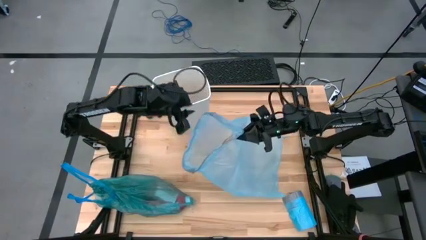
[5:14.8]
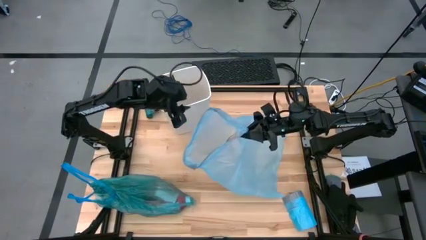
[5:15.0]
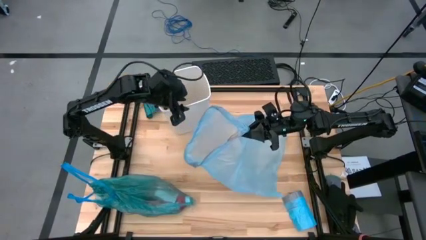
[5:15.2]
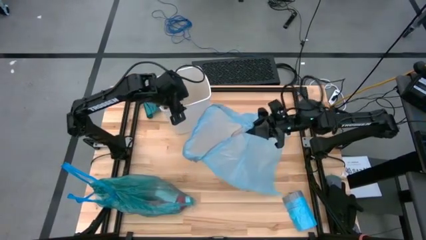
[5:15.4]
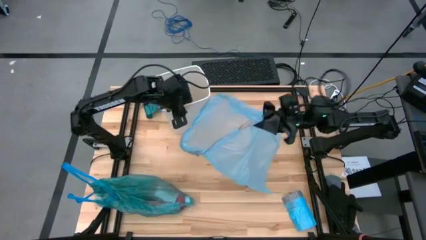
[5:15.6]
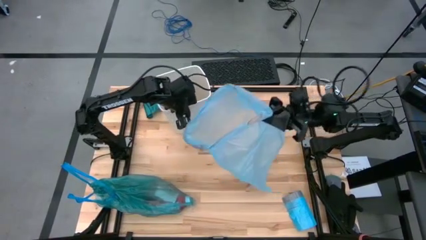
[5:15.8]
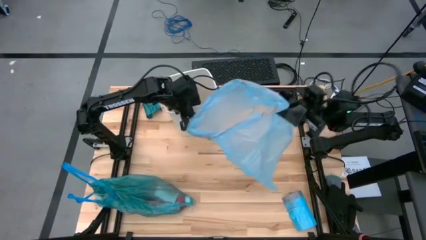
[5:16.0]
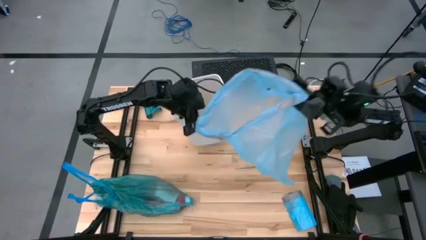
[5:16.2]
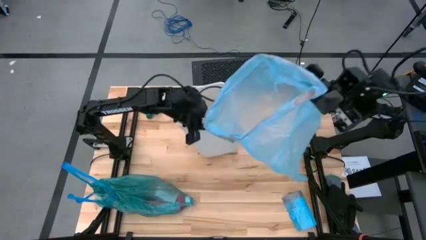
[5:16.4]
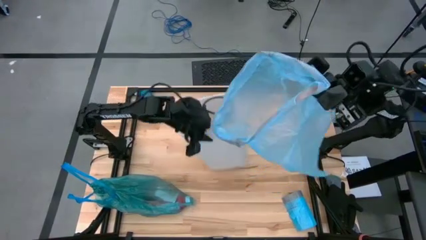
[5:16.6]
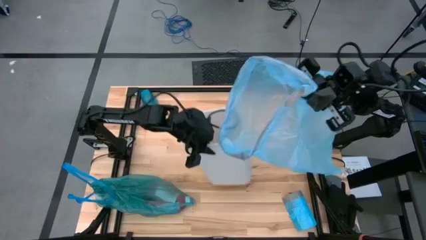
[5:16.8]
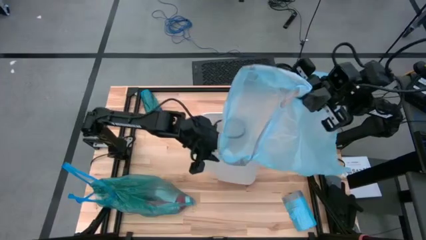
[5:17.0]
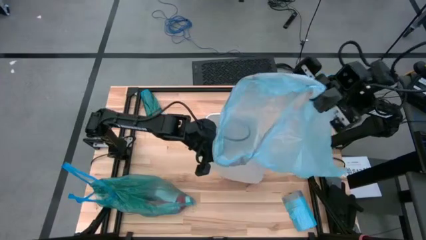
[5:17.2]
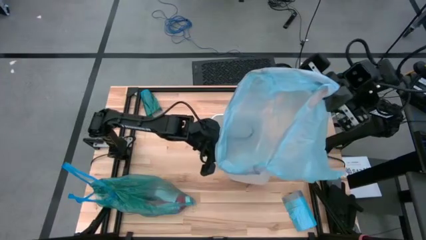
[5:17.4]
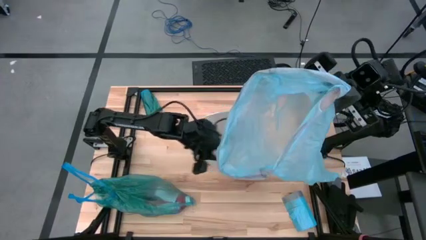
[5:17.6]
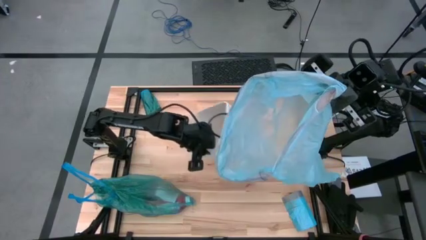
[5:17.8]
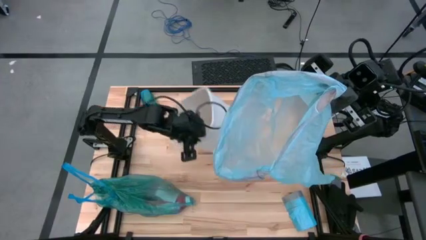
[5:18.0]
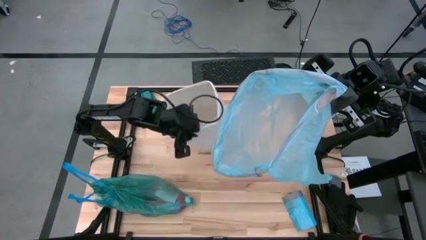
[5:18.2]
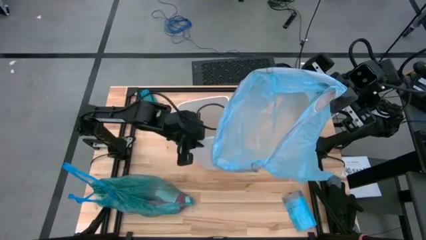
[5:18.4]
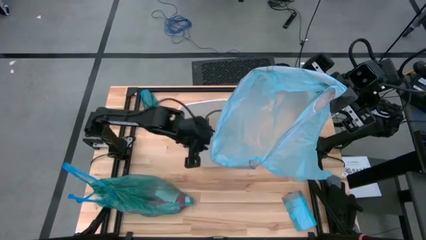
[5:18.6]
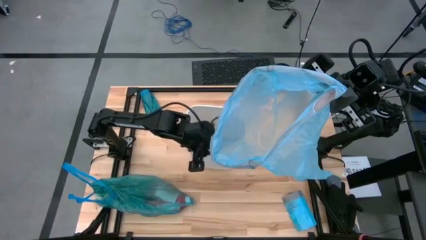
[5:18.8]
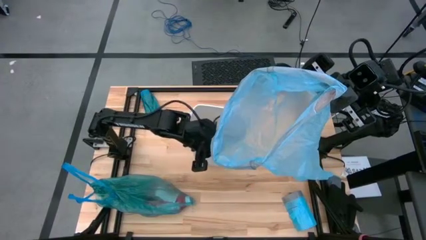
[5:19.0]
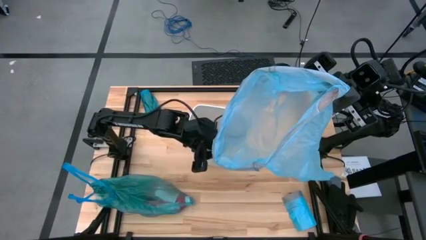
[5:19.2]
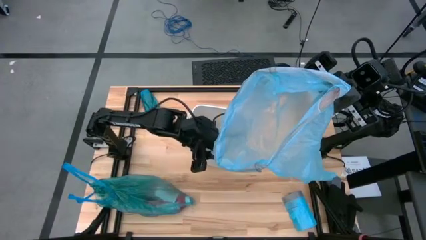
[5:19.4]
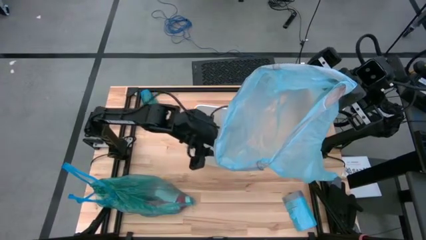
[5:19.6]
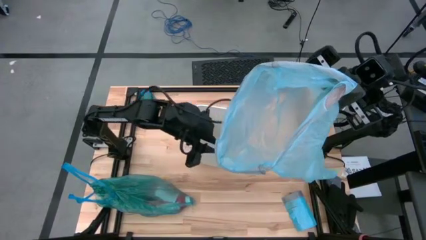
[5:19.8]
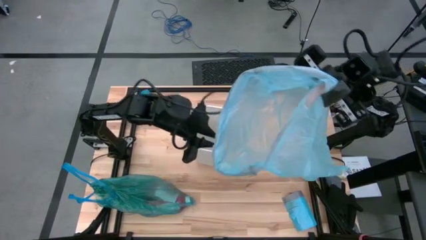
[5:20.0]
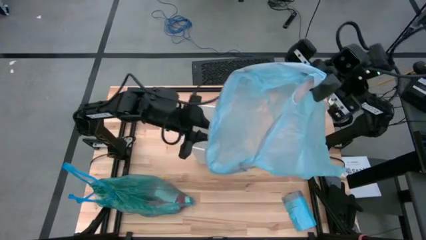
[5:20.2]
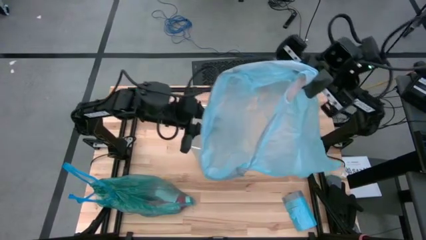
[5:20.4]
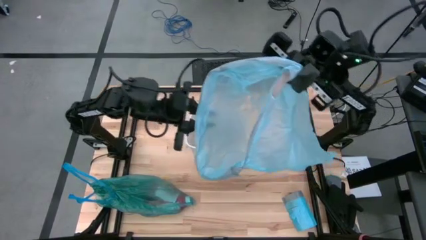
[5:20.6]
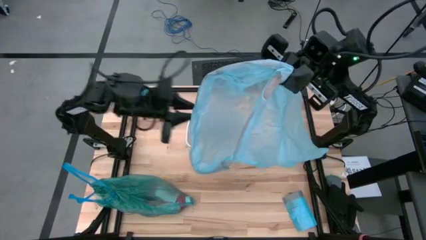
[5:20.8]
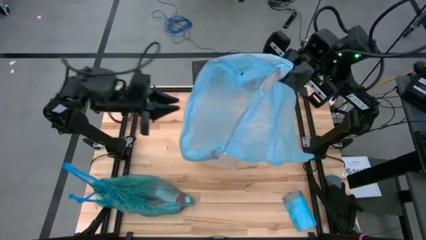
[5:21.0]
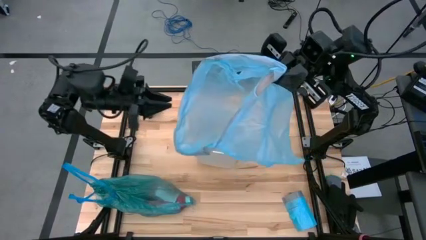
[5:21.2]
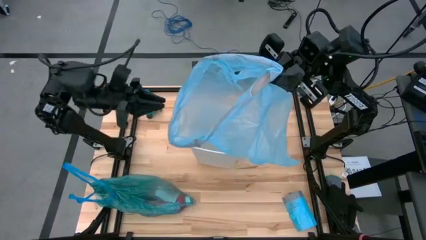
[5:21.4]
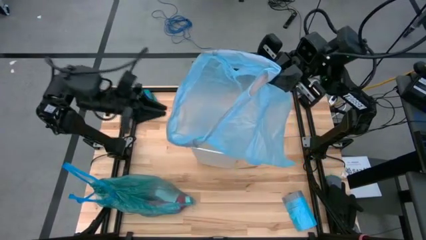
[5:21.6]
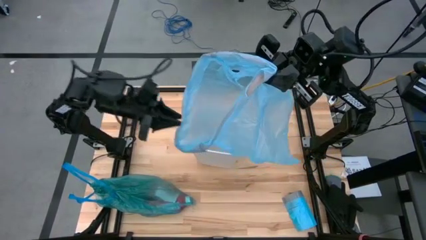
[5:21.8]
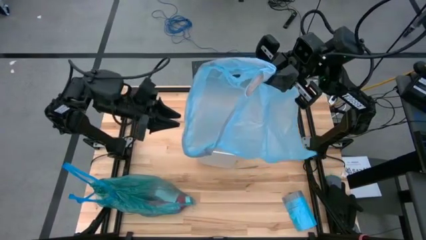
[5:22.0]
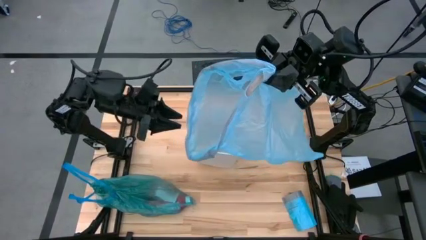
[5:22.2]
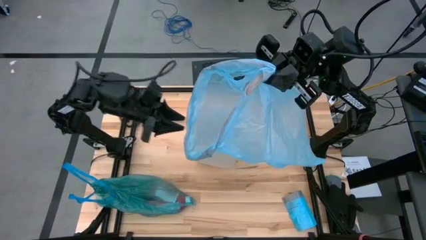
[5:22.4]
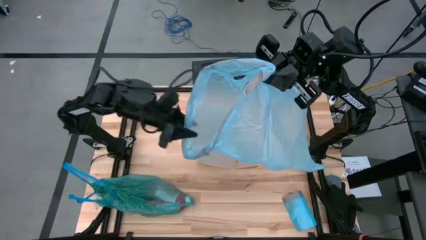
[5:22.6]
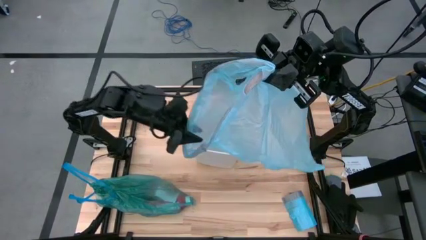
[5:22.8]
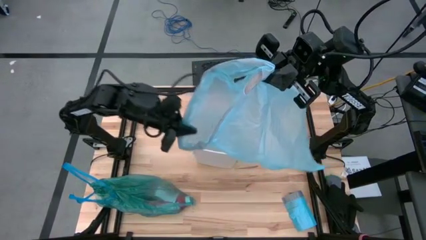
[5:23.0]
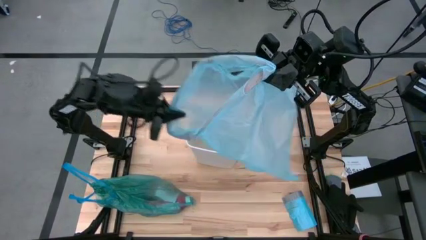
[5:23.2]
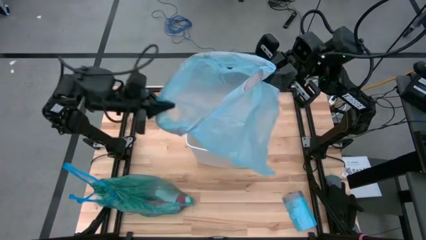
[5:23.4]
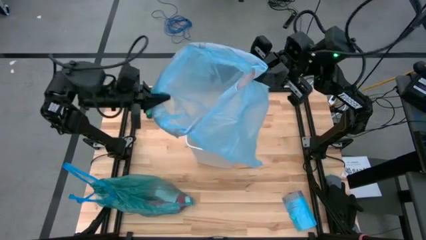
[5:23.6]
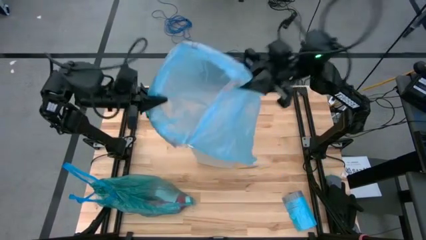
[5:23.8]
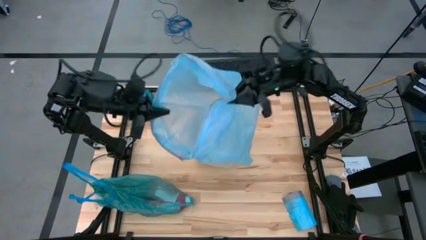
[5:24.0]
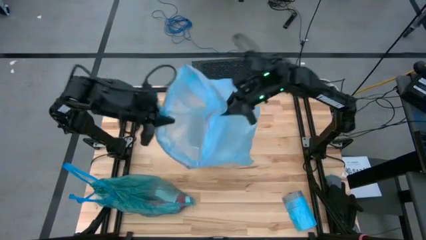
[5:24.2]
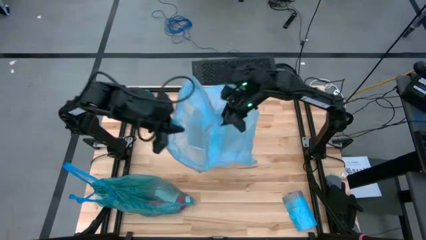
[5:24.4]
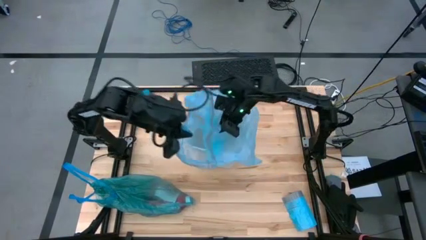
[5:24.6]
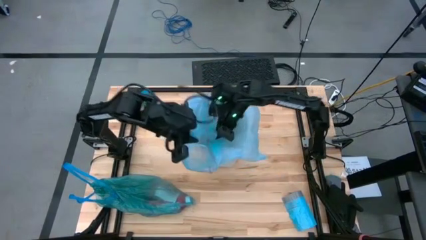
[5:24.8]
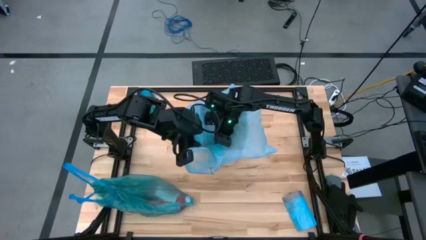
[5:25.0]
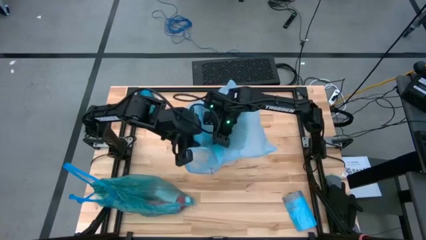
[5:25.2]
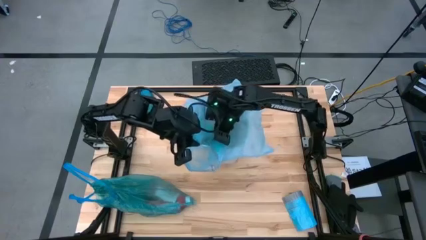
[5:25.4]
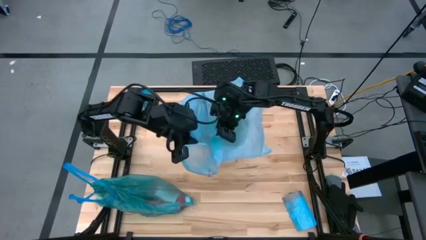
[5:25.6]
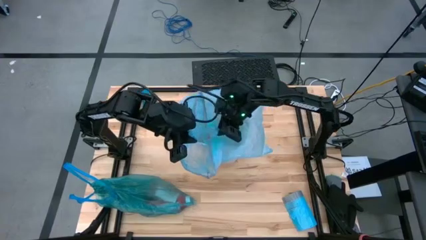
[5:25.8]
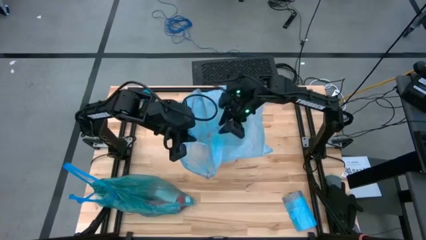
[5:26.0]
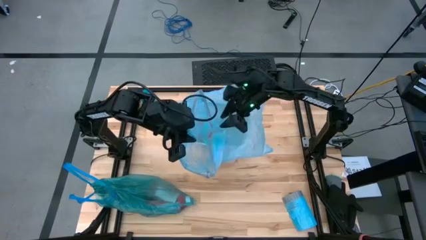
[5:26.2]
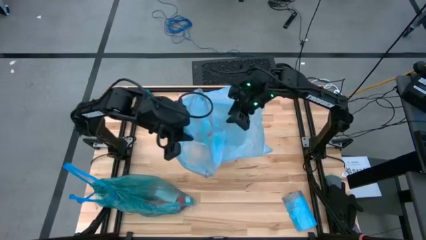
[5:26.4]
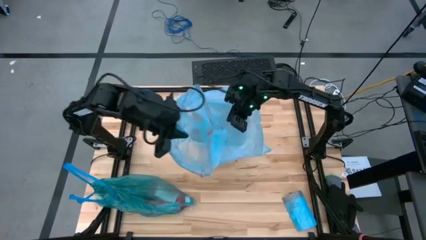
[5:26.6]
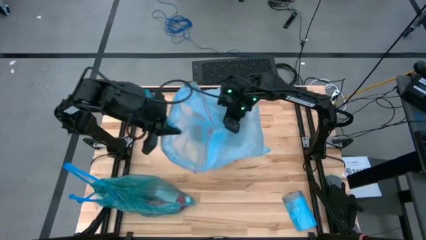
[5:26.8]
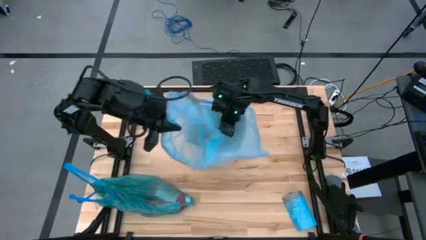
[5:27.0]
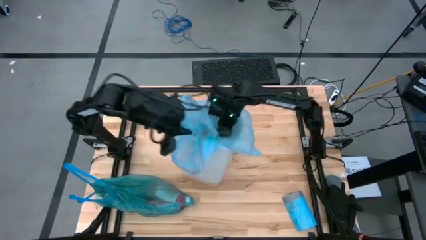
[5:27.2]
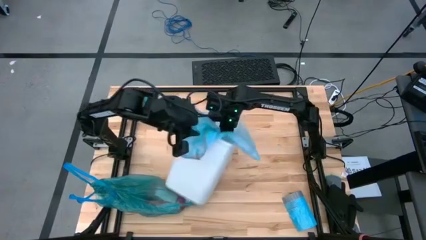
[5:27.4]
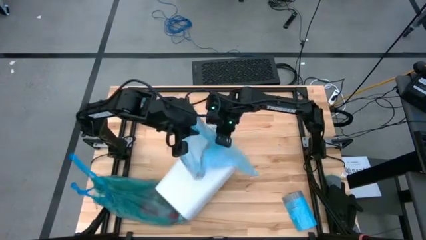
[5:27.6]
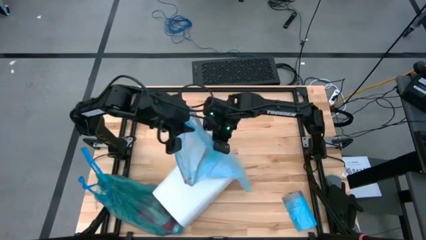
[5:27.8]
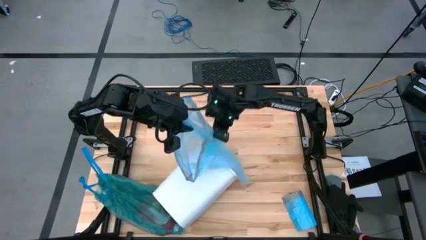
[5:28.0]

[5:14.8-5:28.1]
Task: place trash/remove bag and relplace
Insert the new blue trash bag into the white trash bin

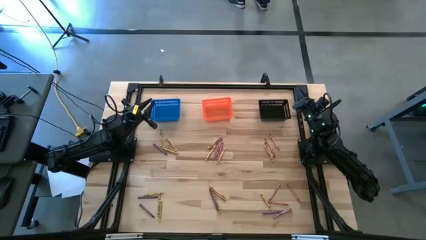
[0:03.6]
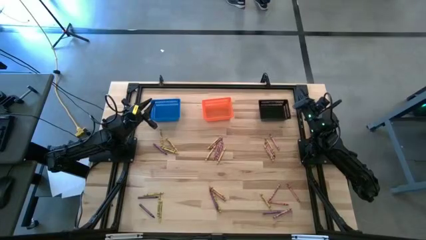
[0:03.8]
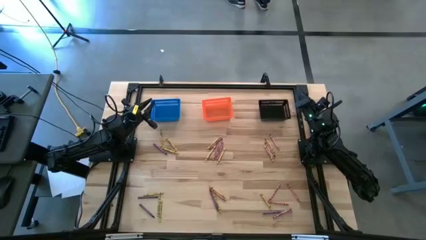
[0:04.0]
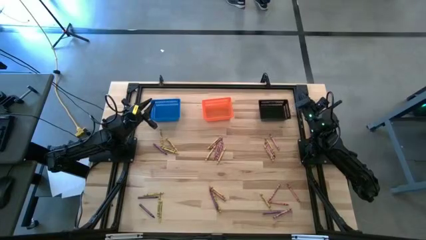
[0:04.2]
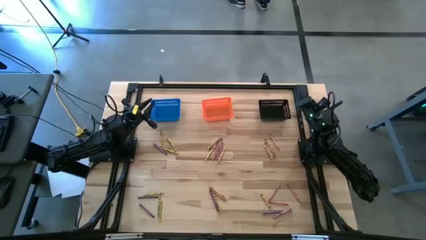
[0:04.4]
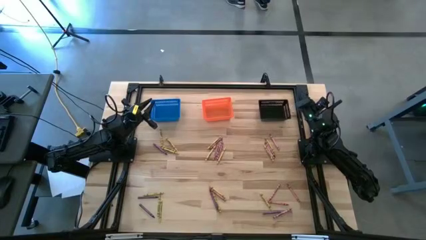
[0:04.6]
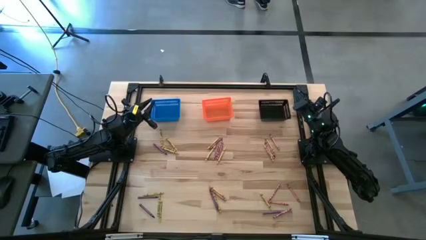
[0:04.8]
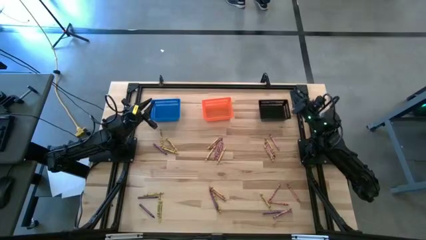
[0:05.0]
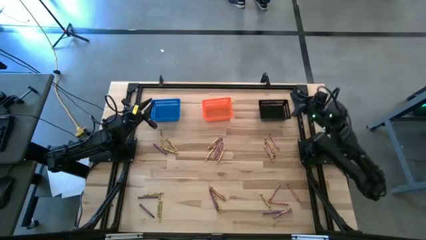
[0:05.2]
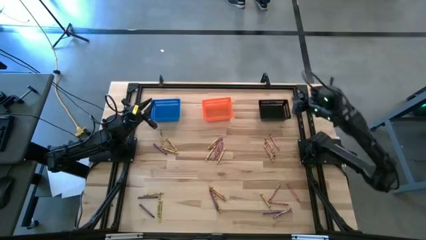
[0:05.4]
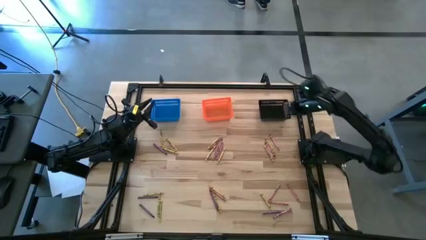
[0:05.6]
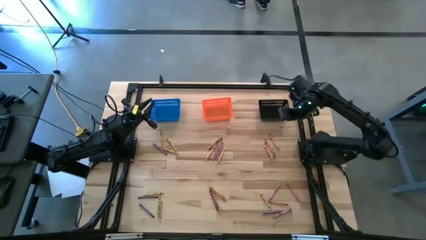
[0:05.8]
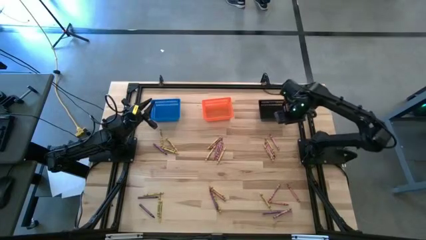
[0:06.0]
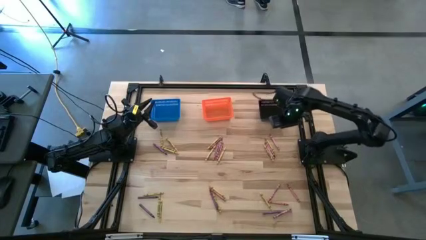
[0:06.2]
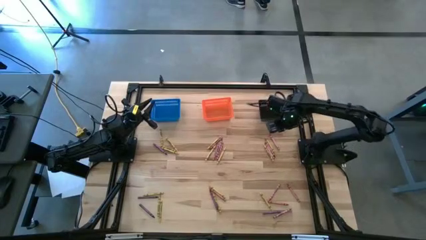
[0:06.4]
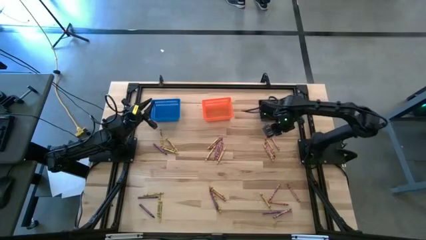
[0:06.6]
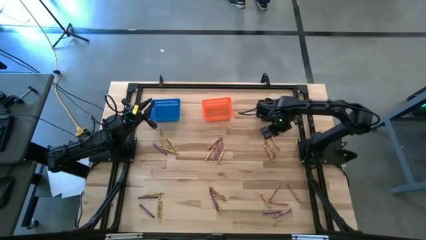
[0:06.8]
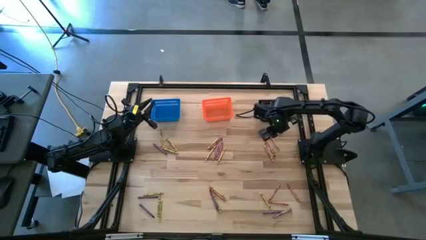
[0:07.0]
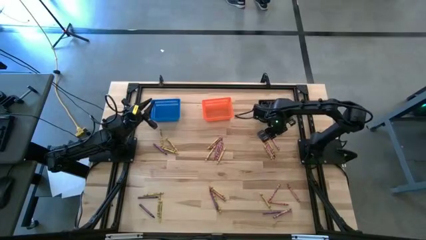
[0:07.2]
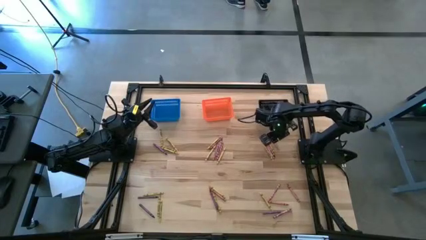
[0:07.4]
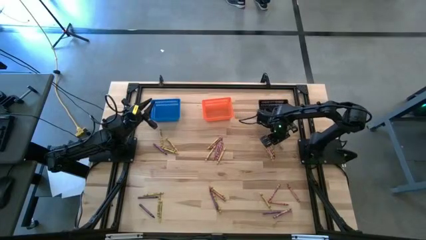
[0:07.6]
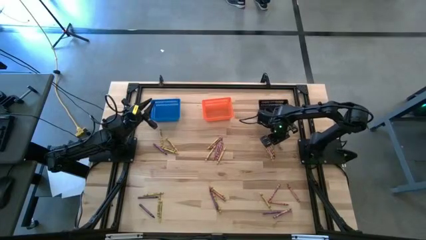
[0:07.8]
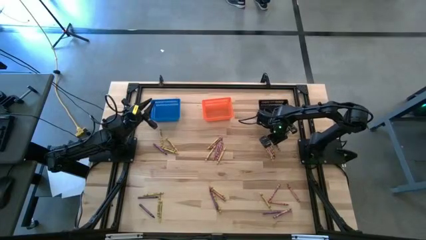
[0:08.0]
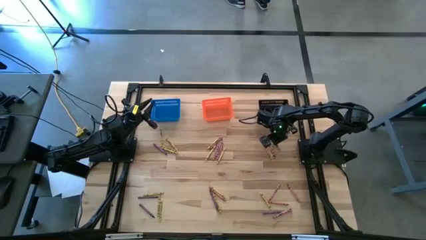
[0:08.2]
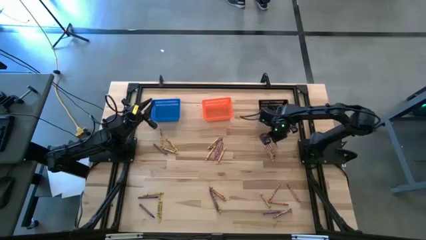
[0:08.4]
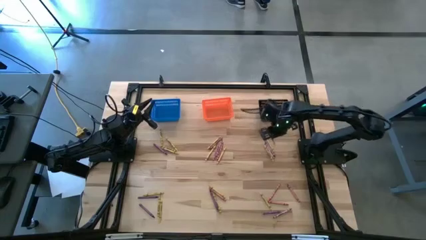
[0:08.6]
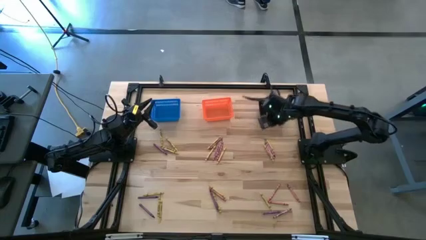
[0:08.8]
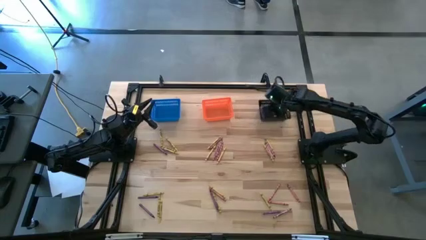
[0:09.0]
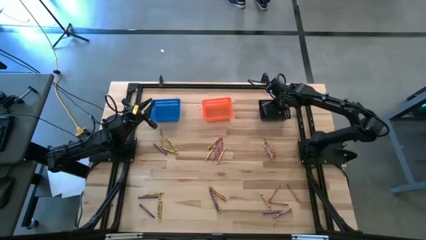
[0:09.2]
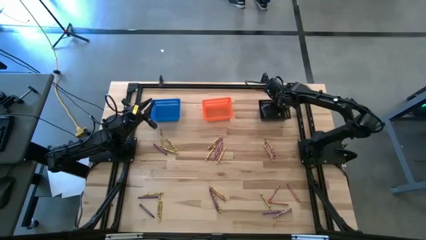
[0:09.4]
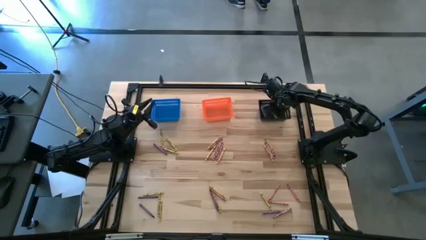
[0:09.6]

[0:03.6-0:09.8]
Task: Sort crayons
Put the red crayon into the black bin
